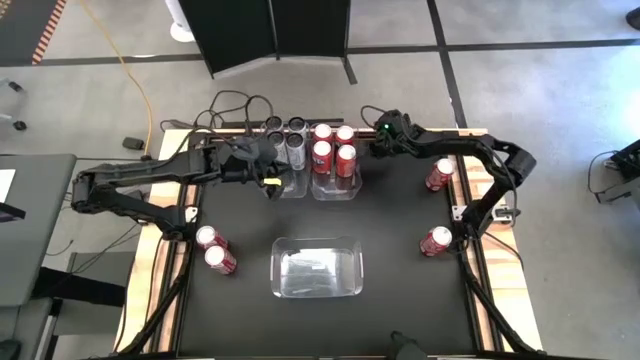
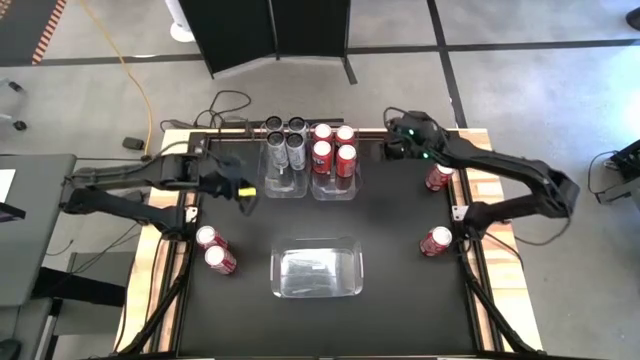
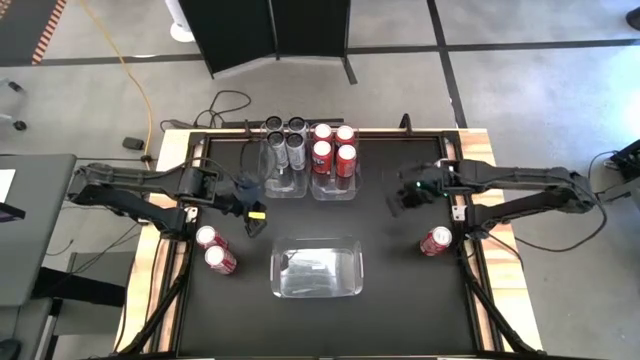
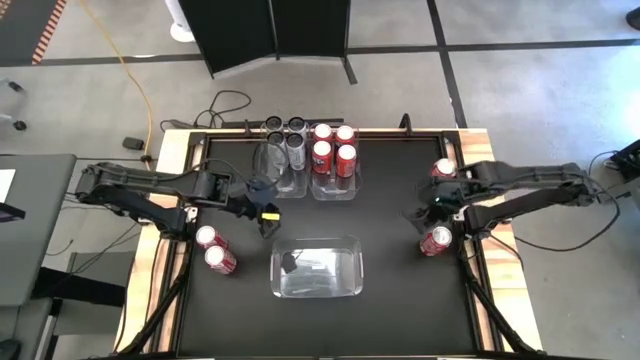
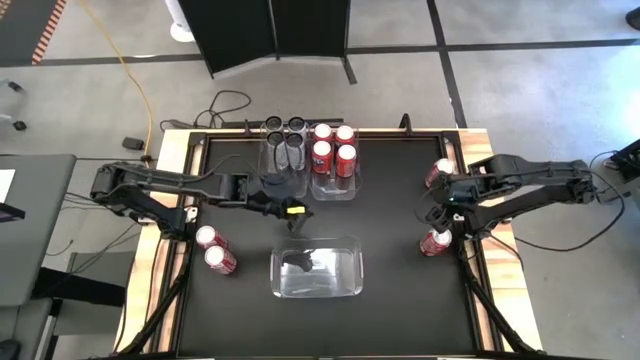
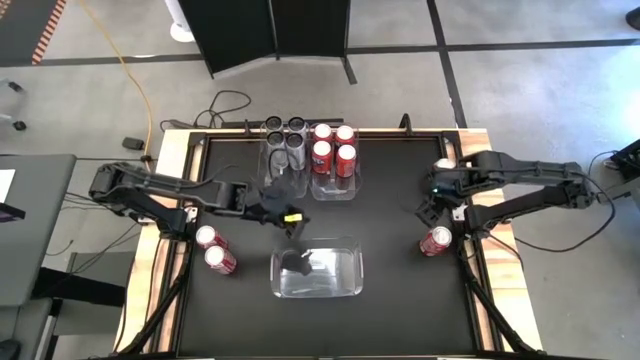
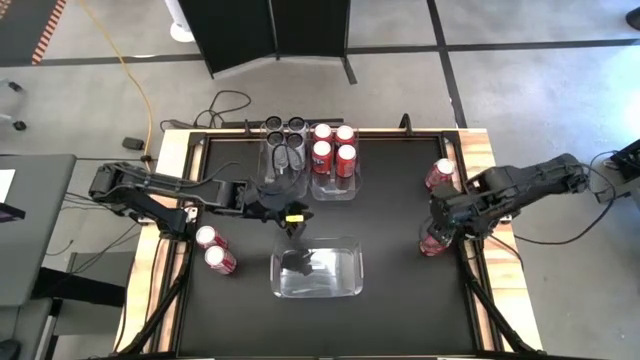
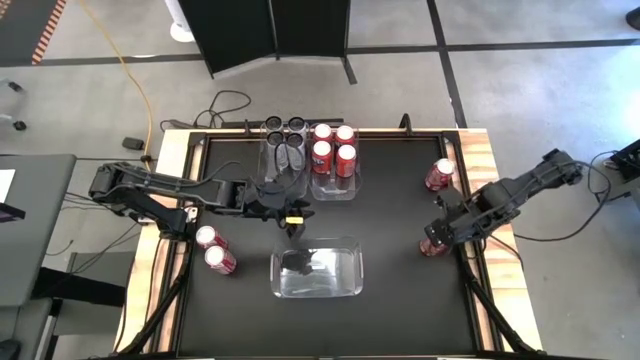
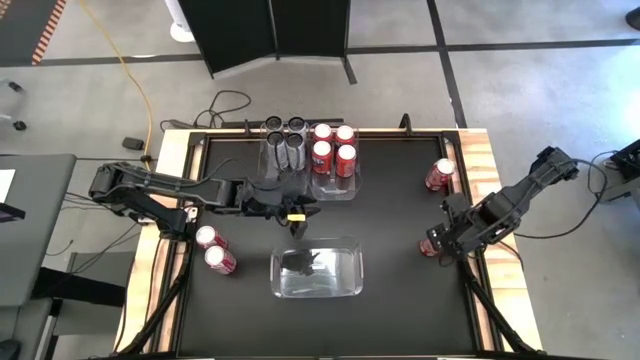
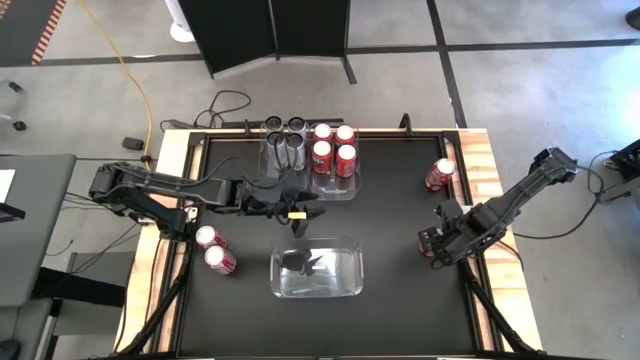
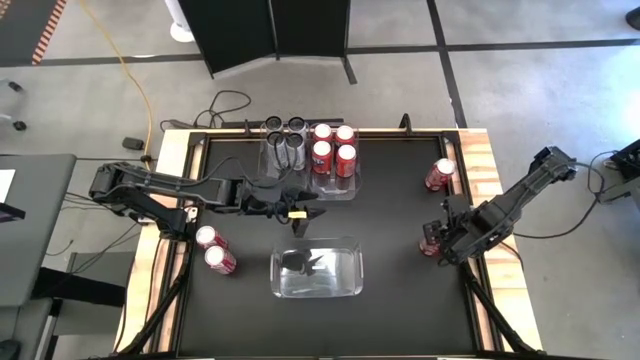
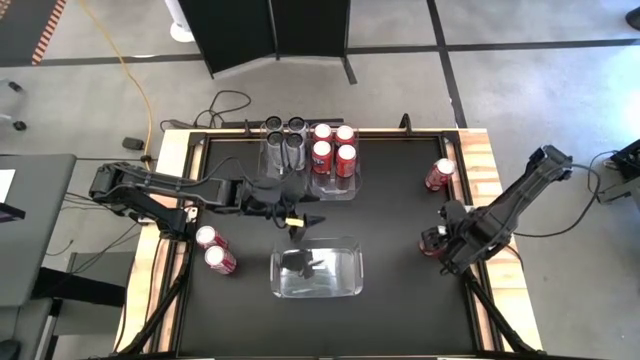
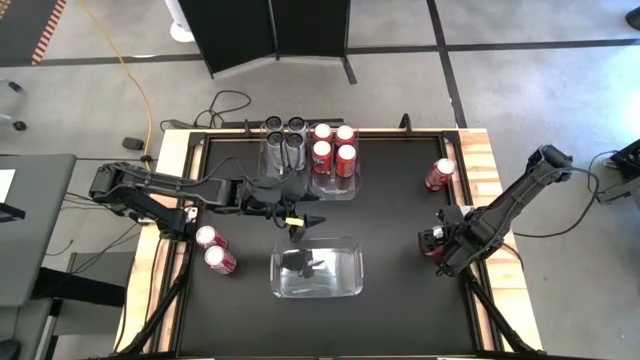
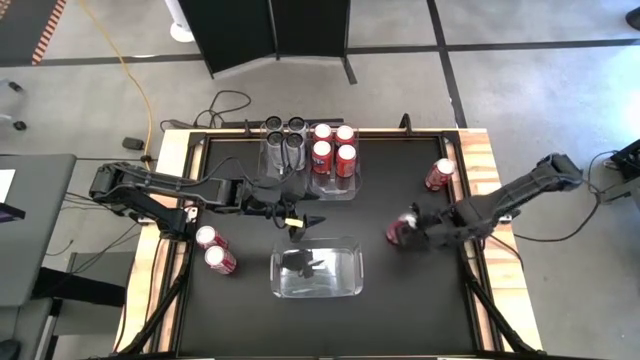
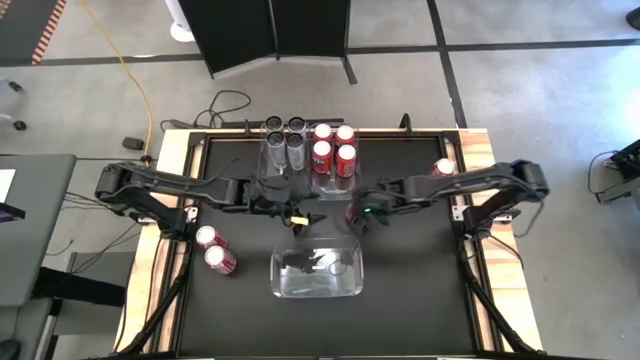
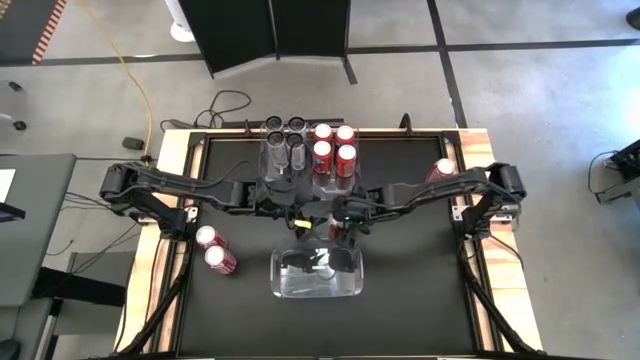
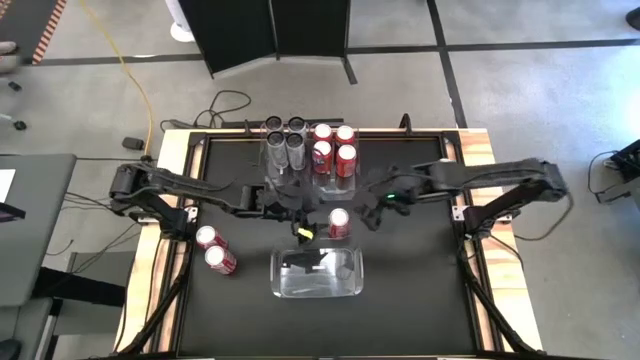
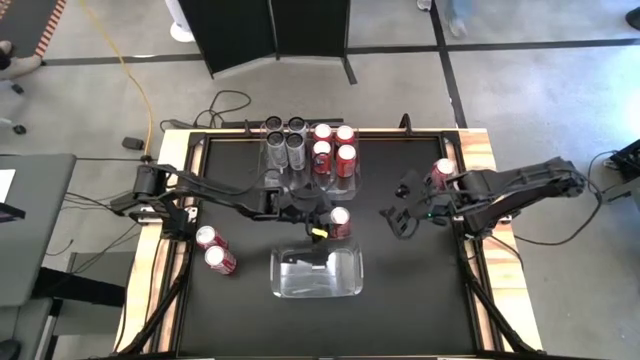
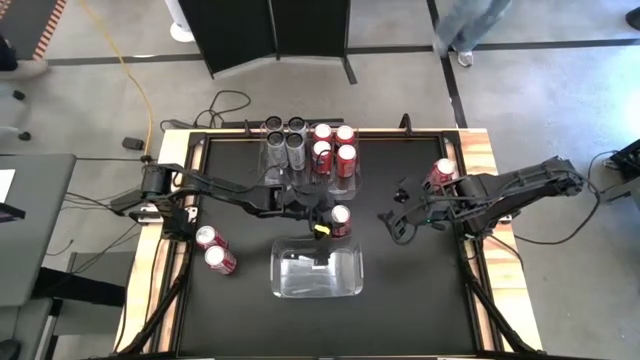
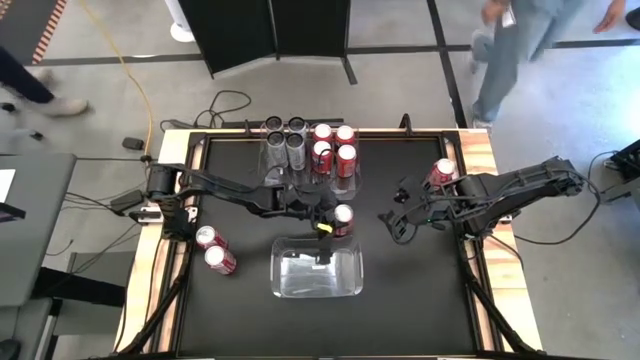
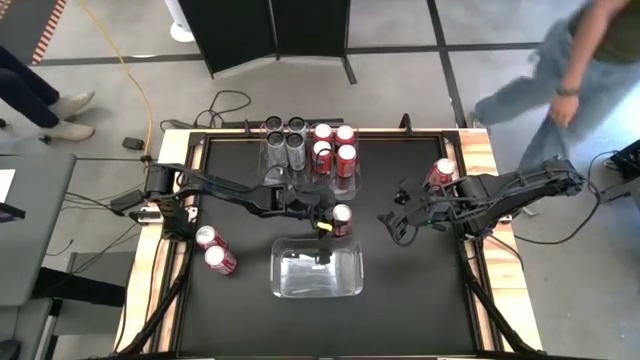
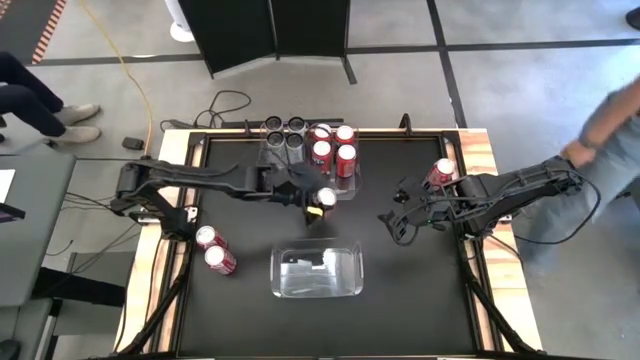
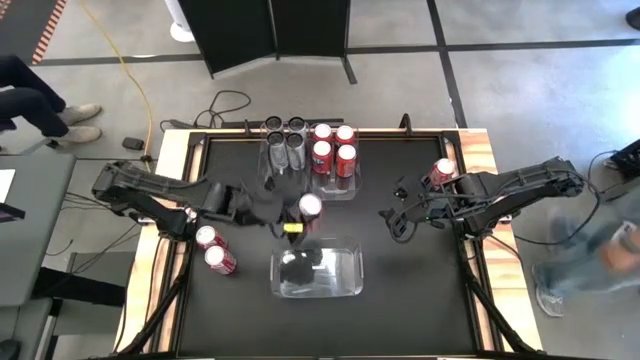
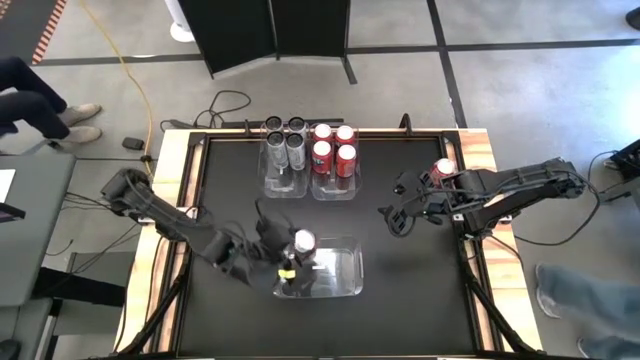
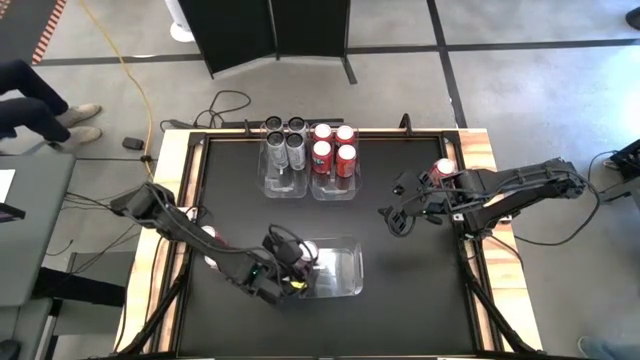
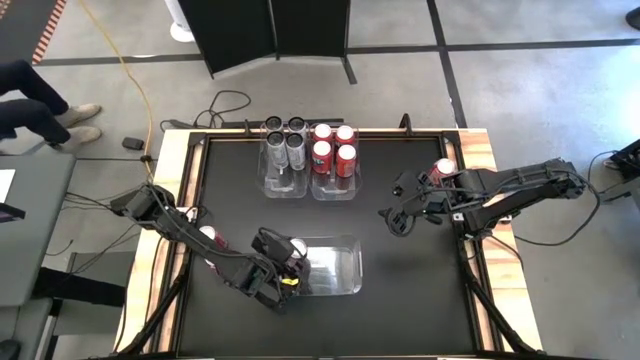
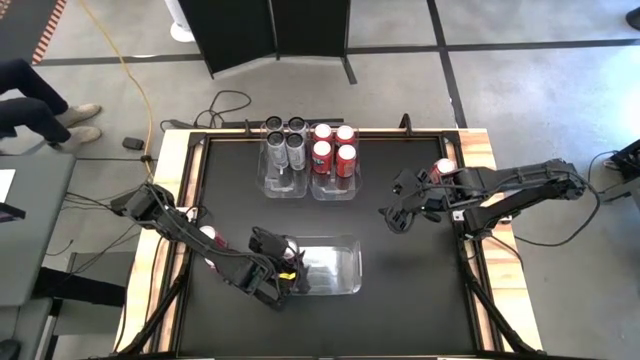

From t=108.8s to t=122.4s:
Task: Sort soda cans
Put the middle right red-white soda can into the bottom transparent bin

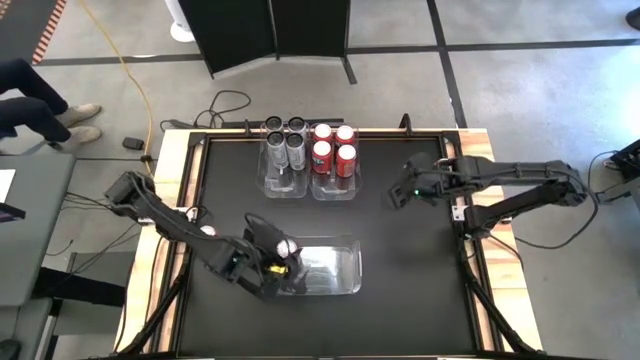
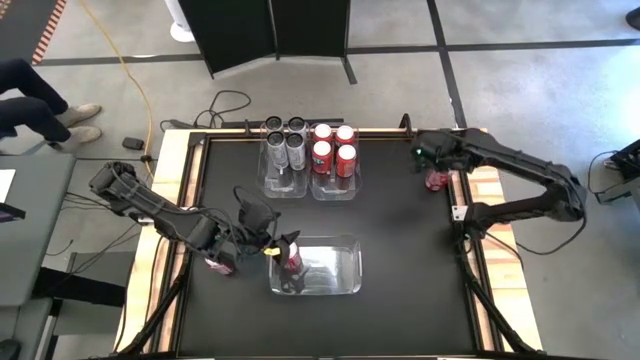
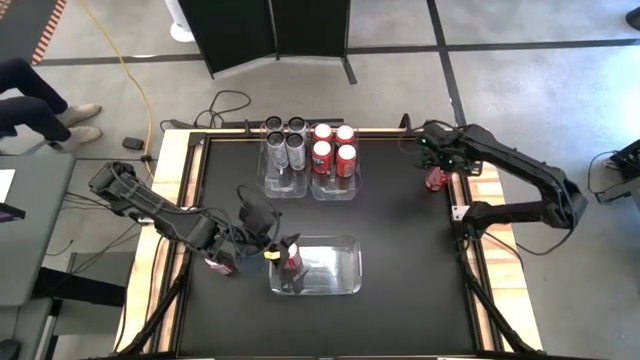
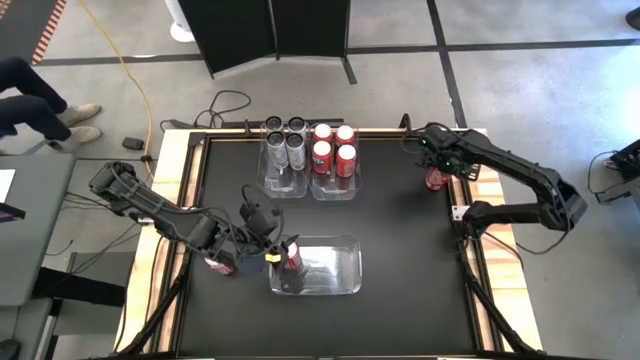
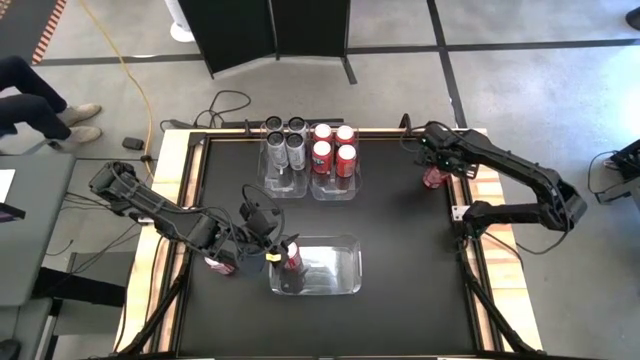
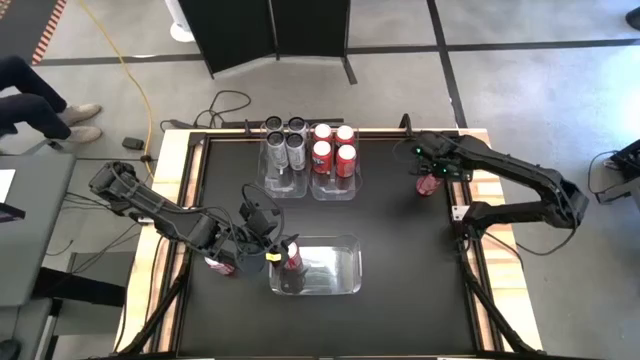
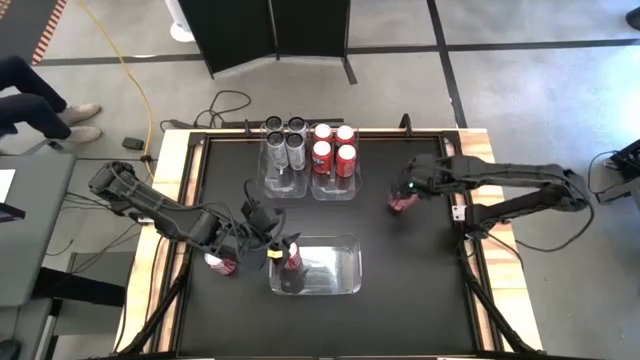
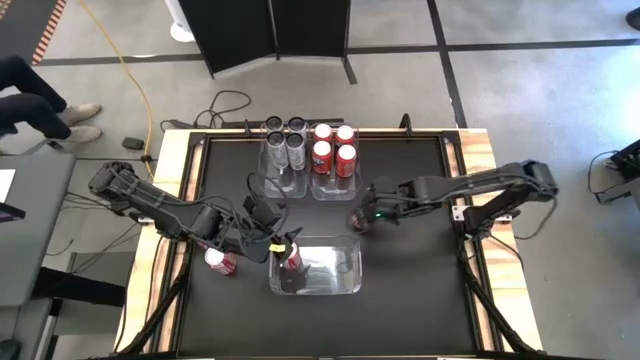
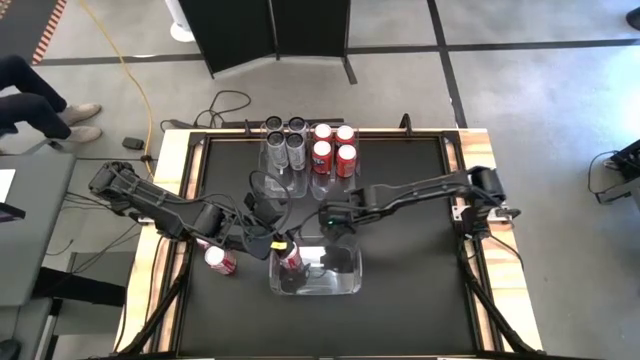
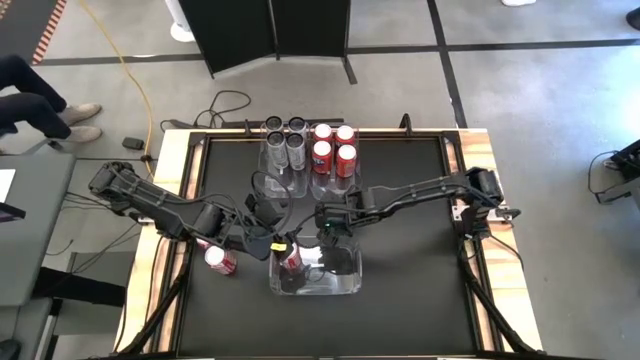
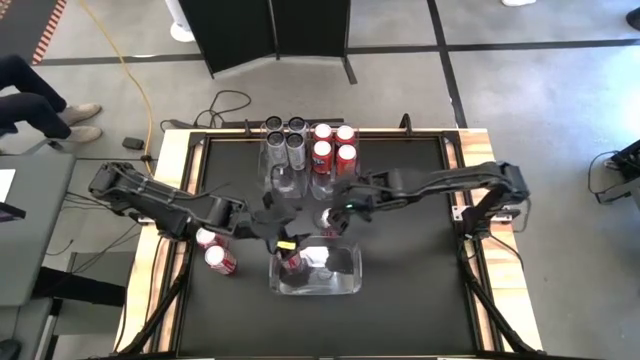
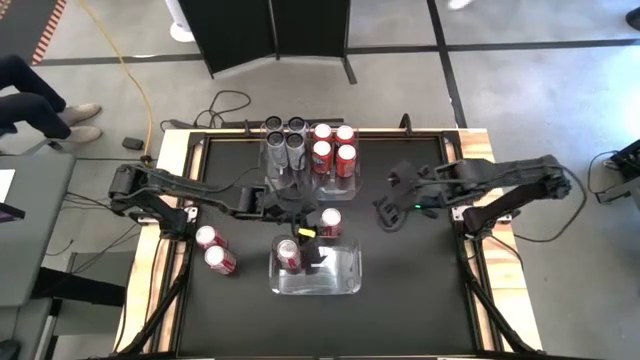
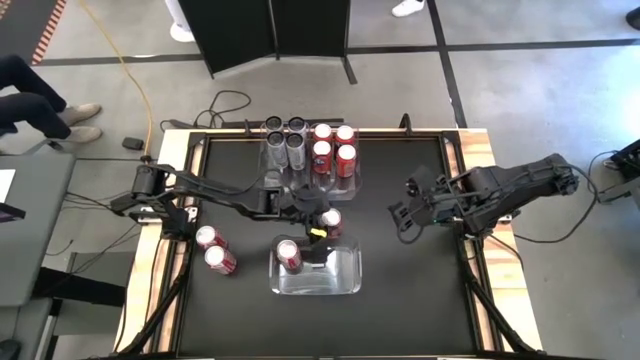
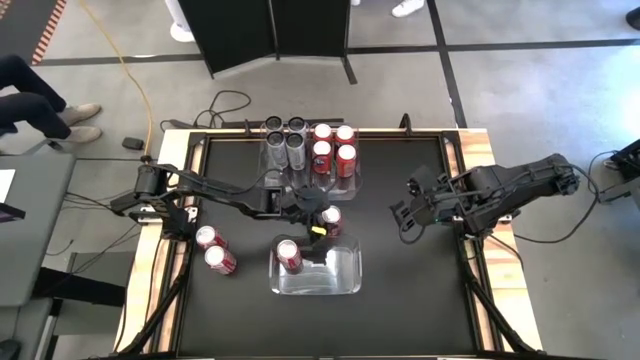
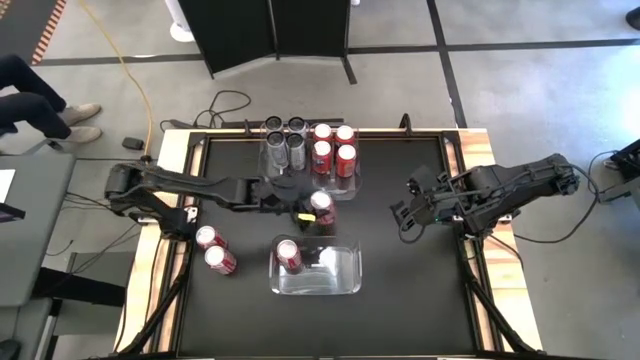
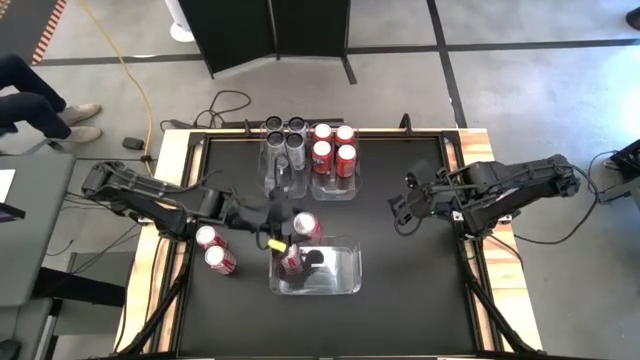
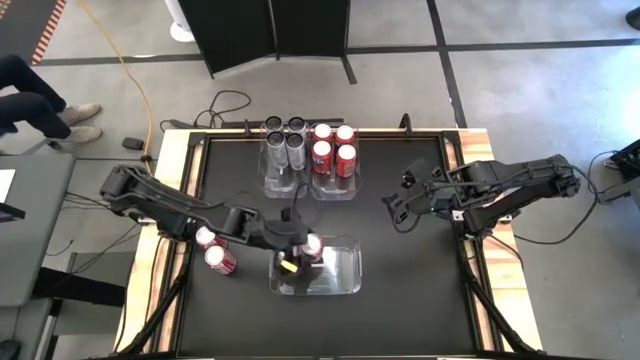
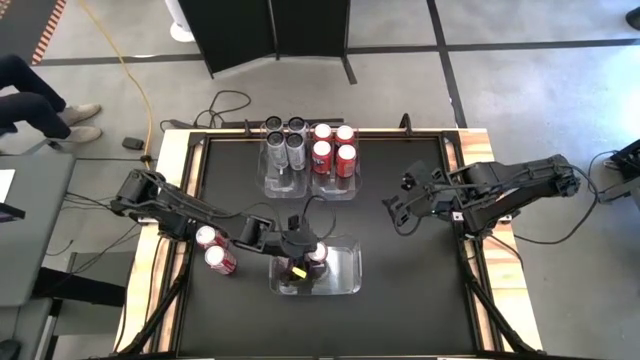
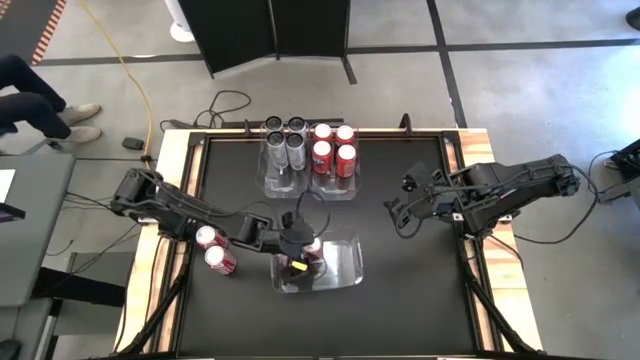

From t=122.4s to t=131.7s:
Put the top red-white soda can into the bottom transparent bin
